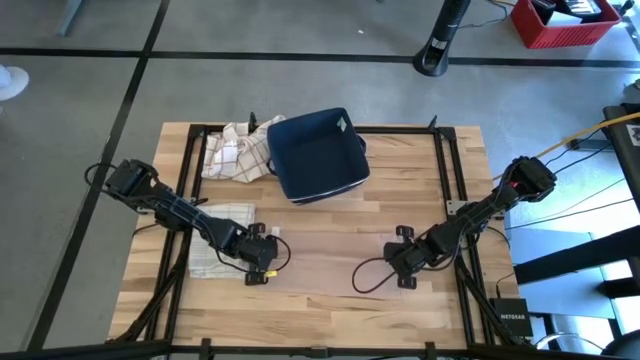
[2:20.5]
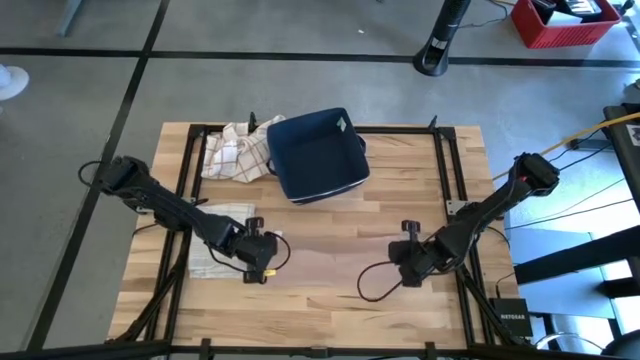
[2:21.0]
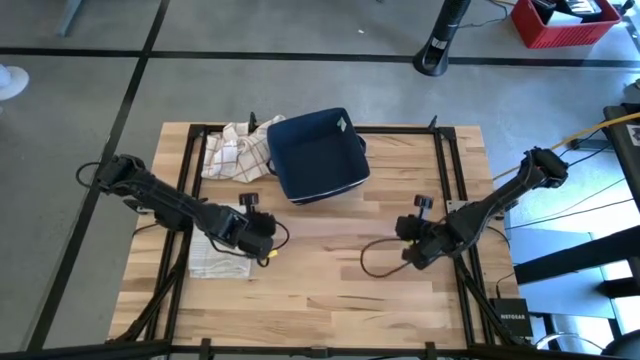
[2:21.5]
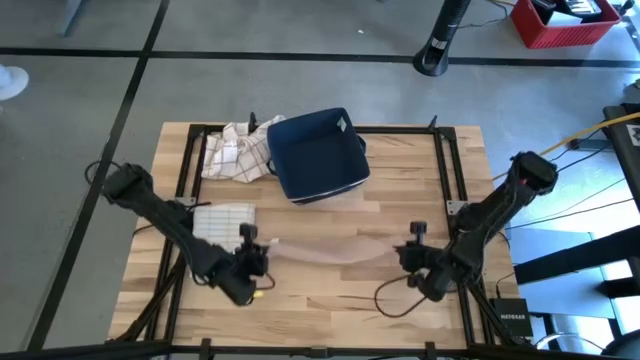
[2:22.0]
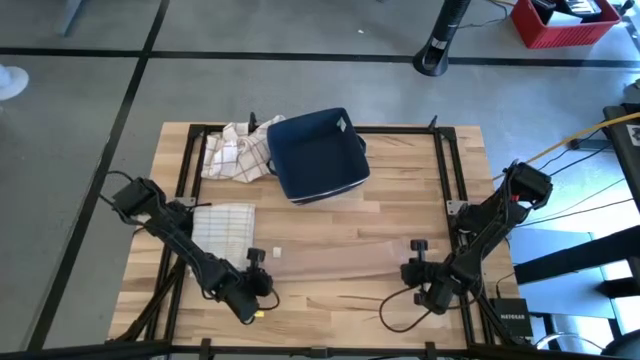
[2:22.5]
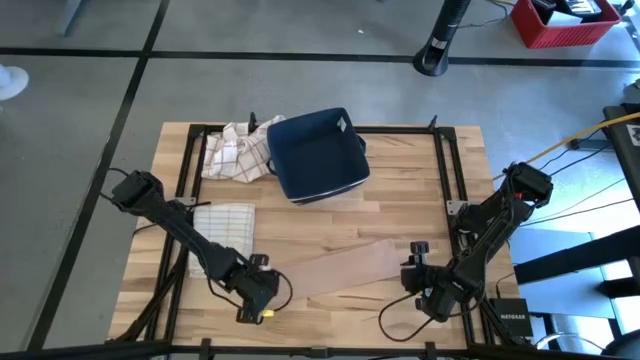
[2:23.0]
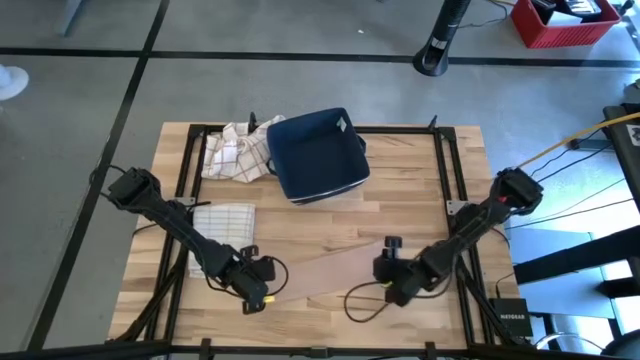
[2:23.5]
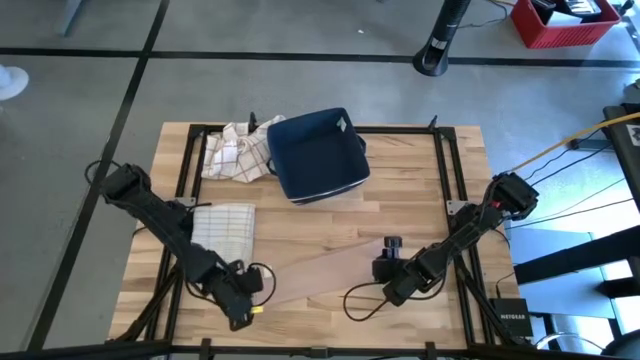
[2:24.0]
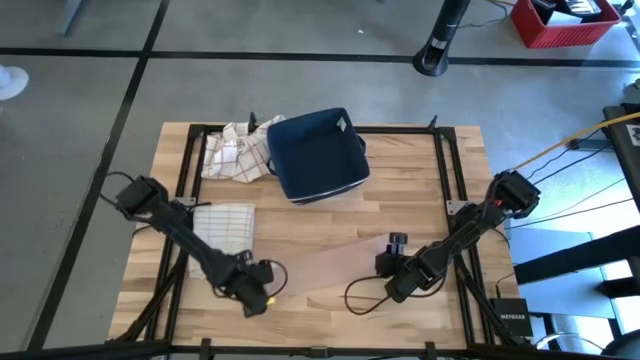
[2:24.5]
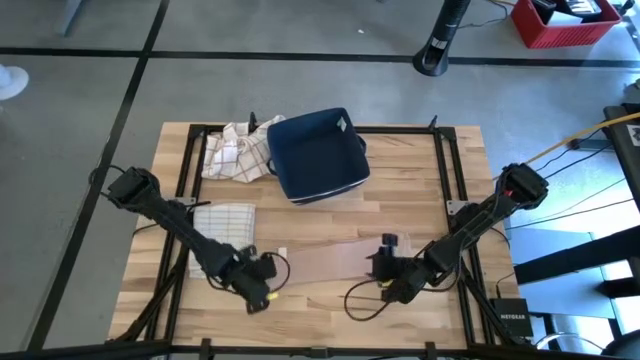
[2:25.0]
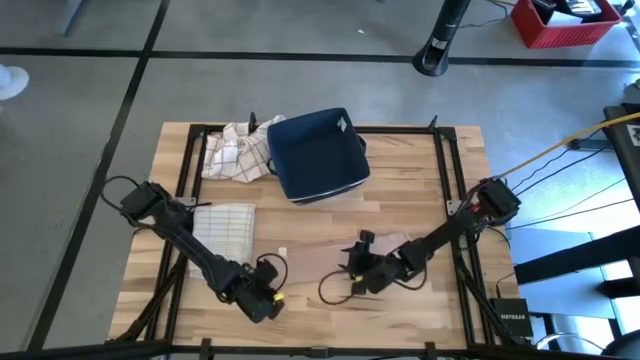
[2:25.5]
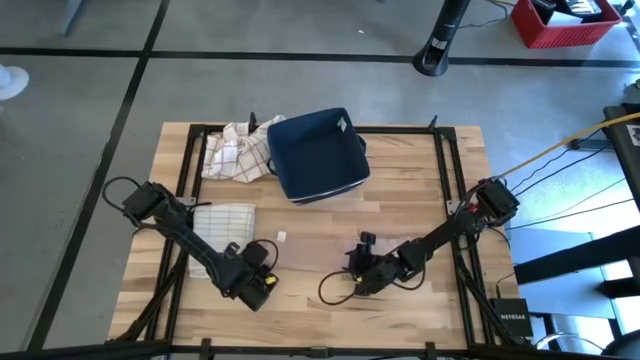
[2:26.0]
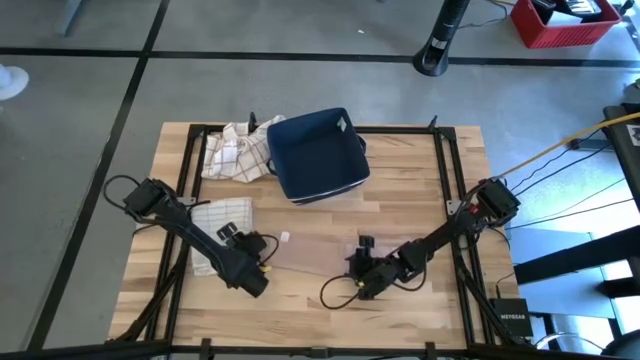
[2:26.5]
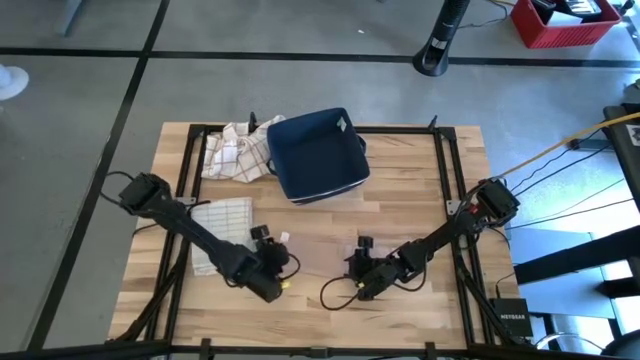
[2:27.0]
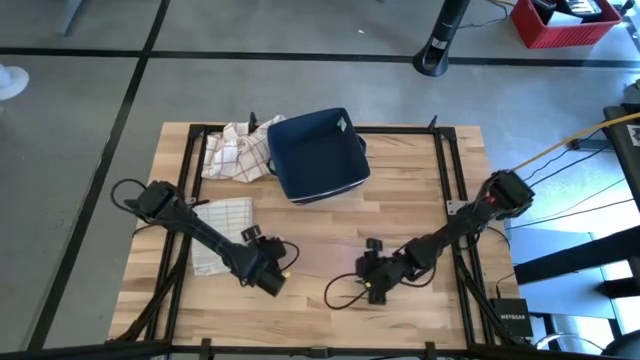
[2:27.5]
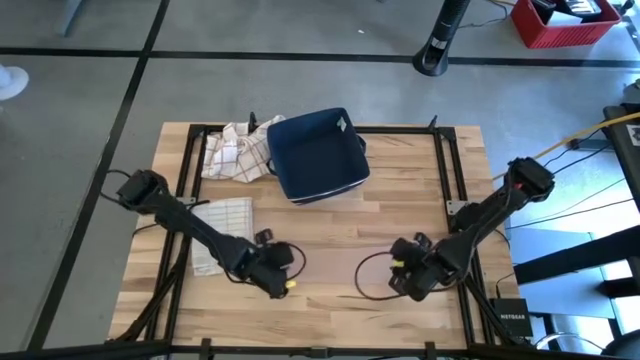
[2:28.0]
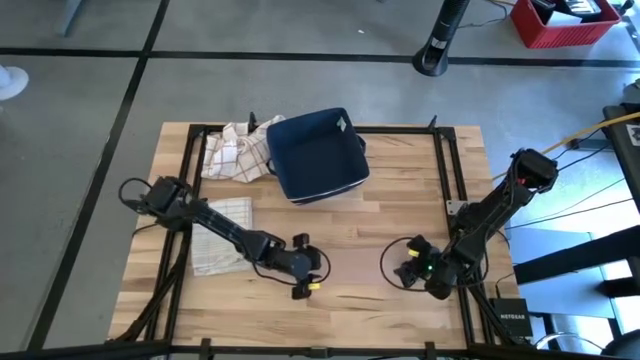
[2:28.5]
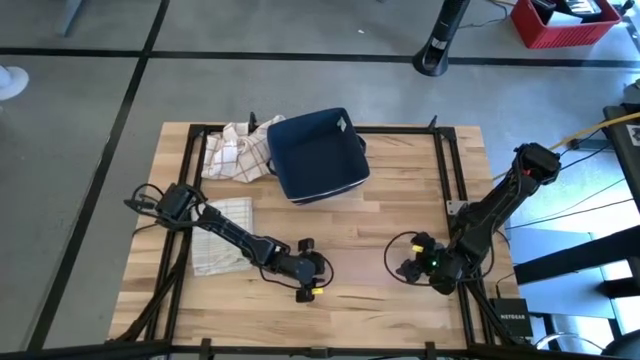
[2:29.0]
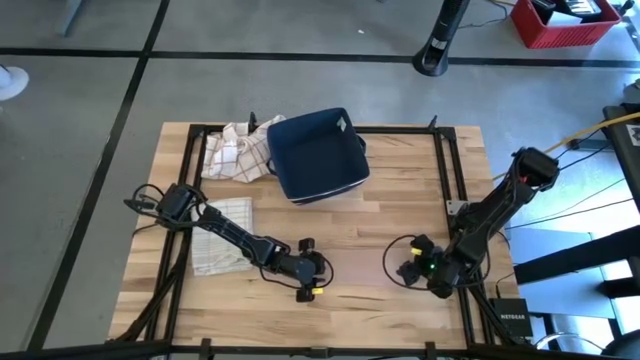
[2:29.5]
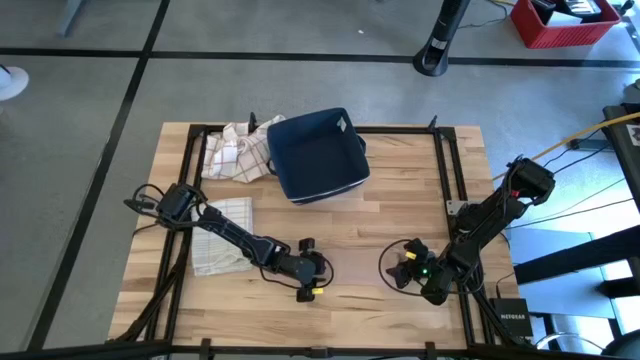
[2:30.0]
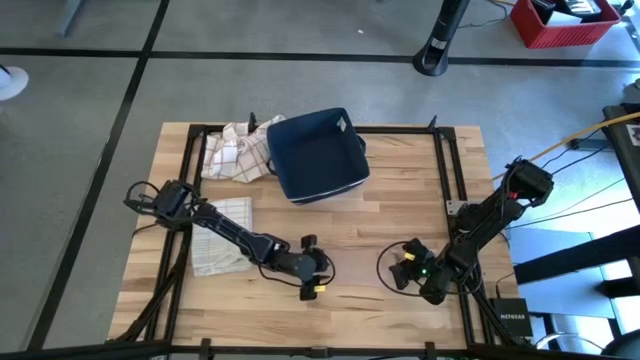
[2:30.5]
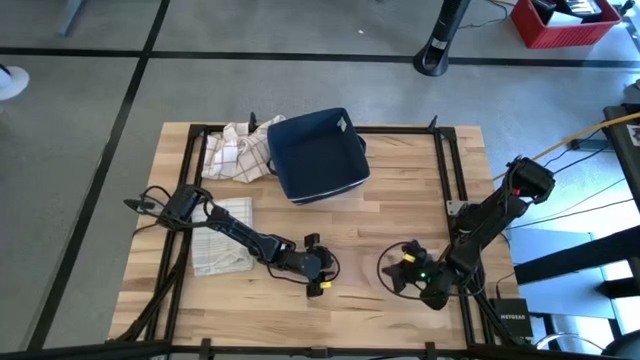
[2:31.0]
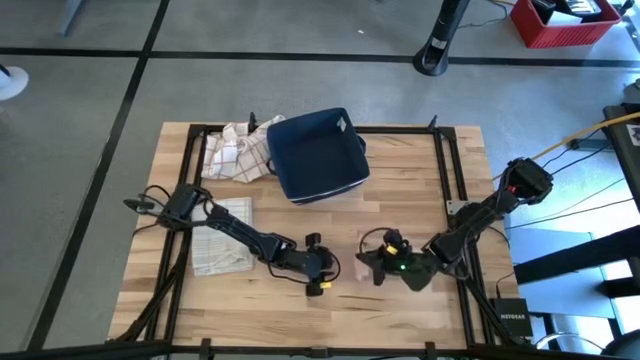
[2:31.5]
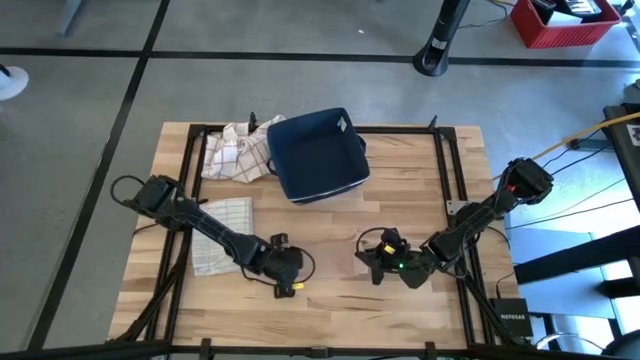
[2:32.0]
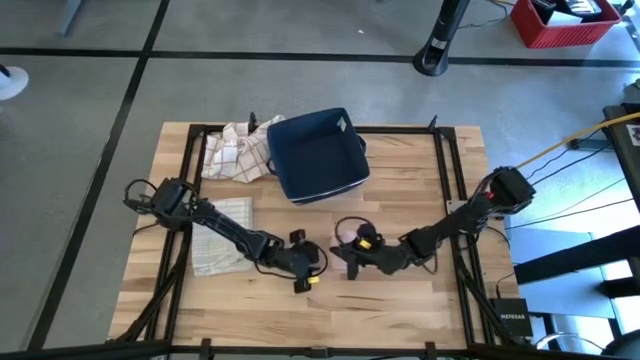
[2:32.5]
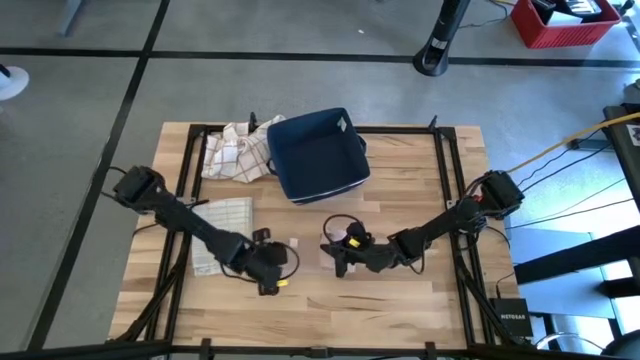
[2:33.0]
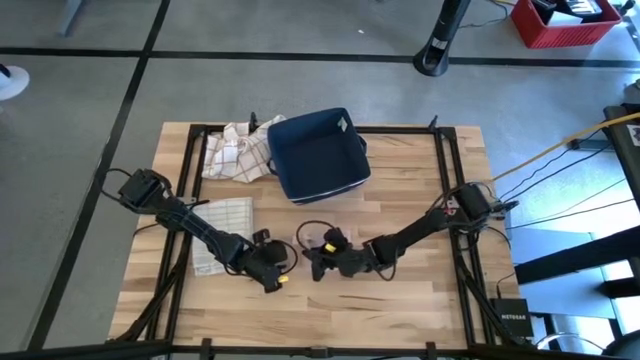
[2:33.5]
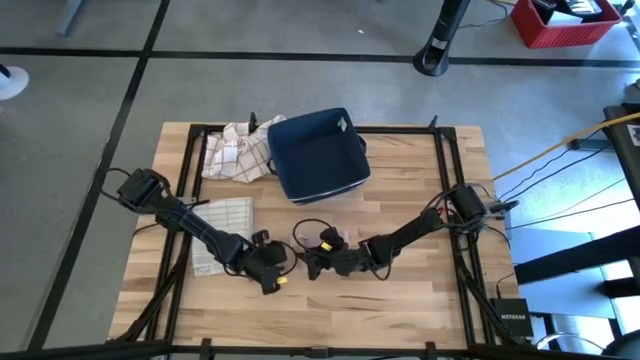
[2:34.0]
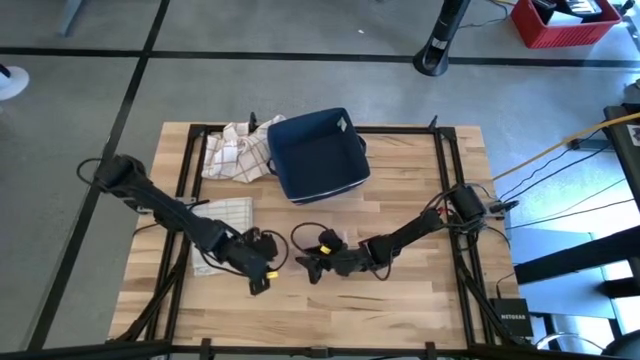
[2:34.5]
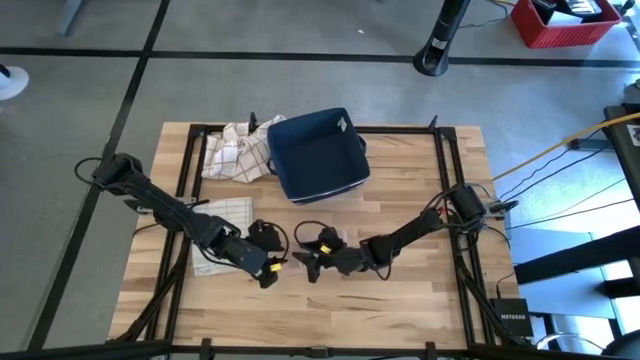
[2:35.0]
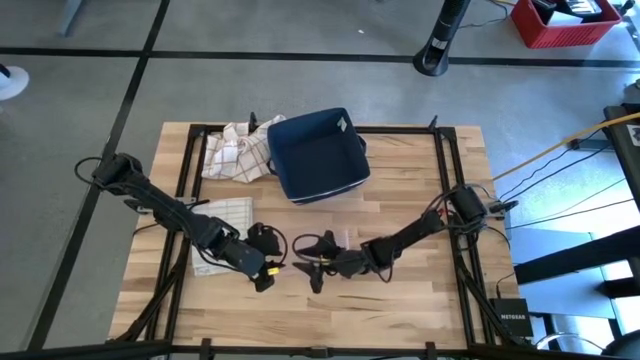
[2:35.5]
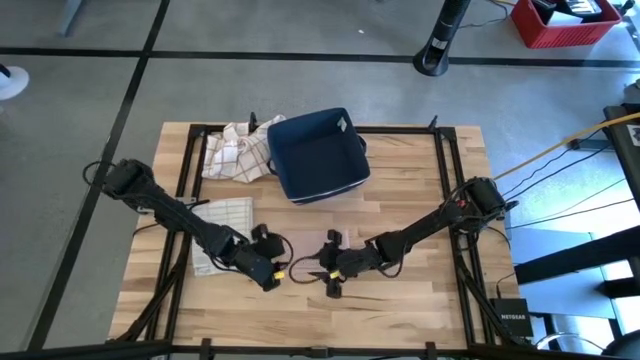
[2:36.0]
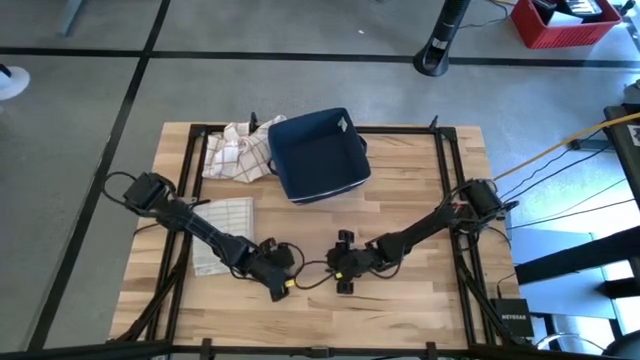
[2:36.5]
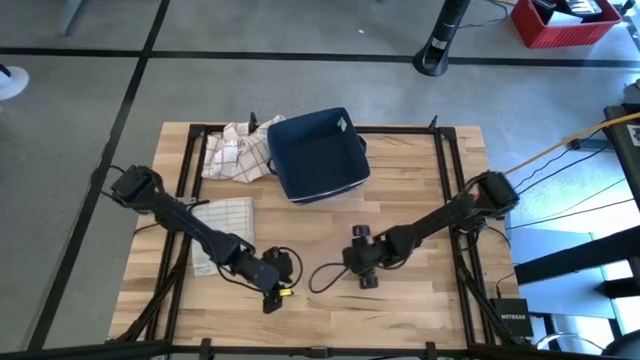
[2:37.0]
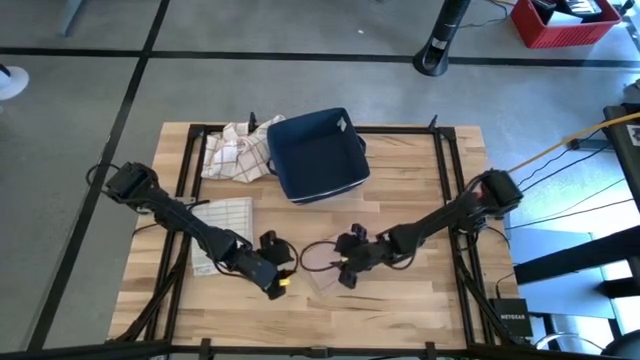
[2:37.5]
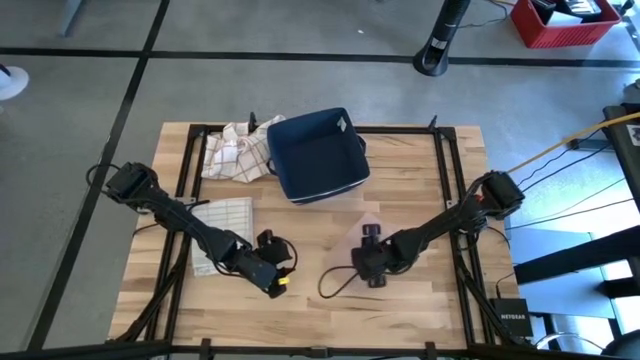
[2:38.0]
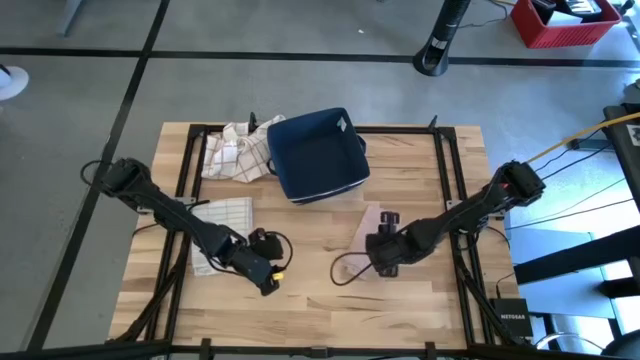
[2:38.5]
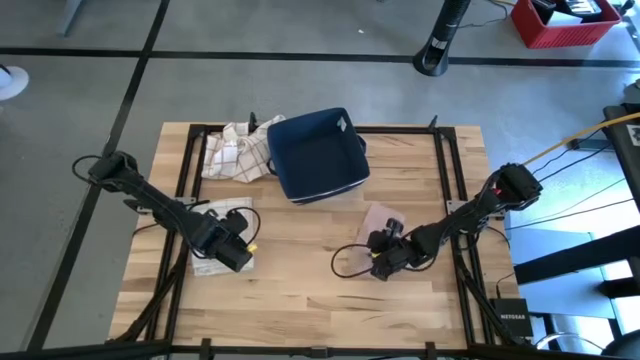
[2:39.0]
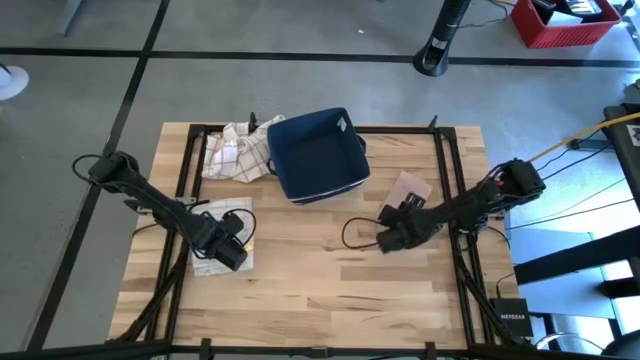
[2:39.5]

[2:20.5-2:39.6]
Task: Fold towel
Fold the pink towel on the table

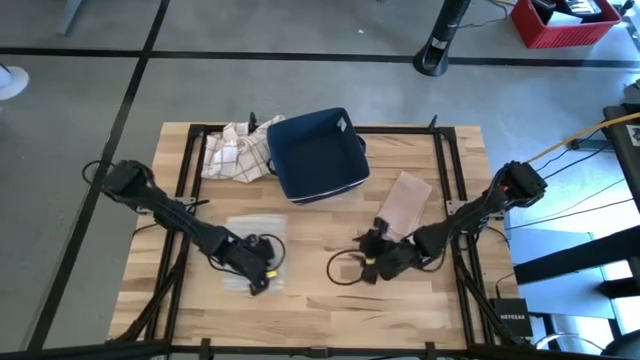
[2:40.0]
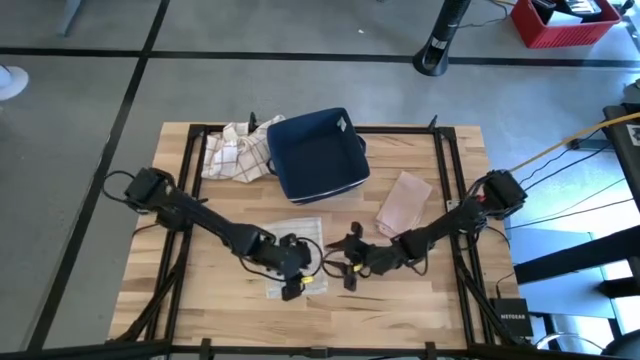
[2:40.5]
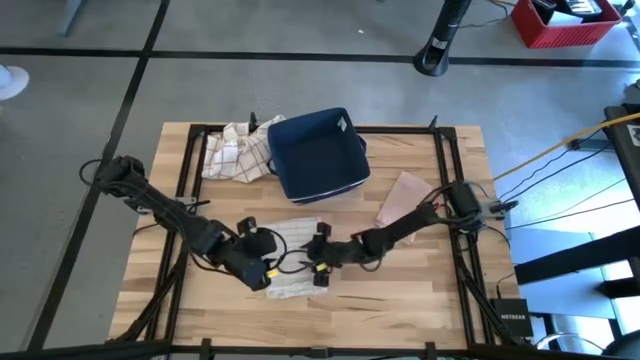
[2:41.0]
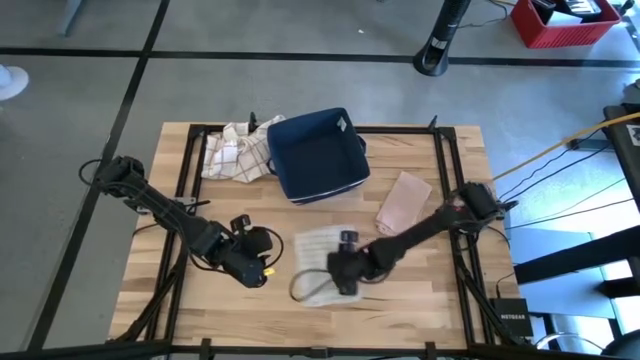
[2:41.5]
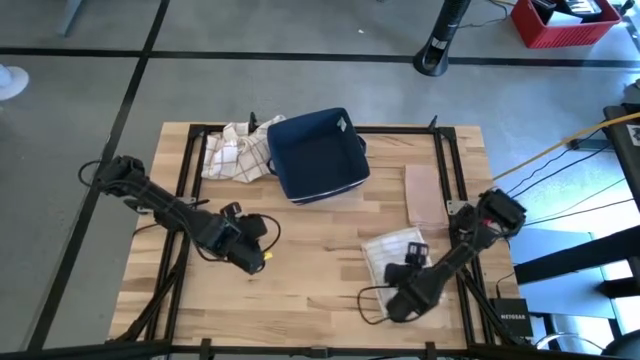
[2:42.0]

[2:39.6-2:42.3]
Move the white with gray pattern towel to the right center of the table
